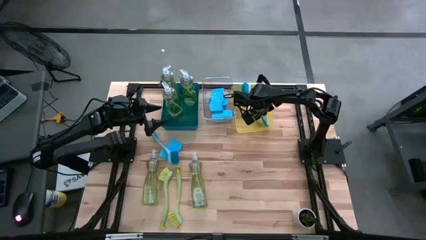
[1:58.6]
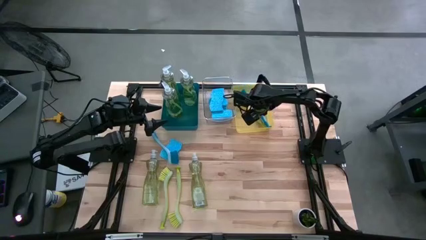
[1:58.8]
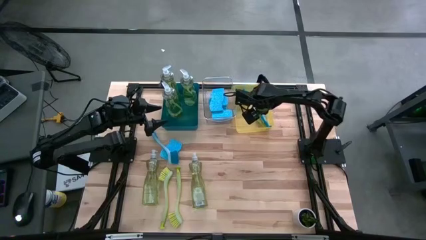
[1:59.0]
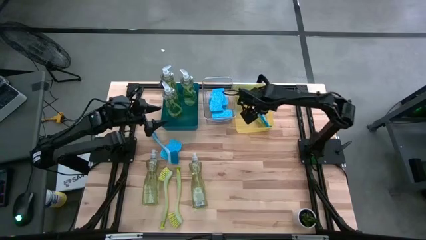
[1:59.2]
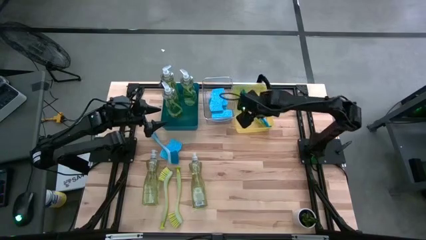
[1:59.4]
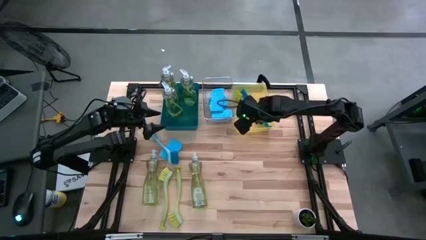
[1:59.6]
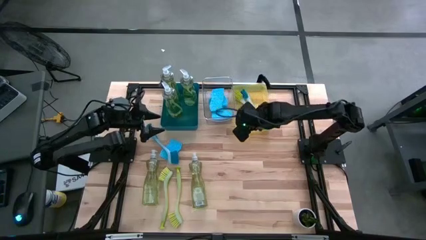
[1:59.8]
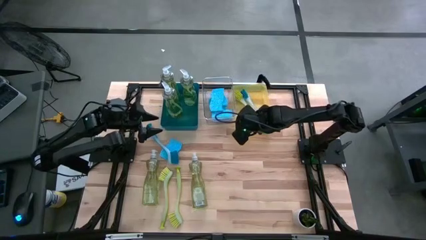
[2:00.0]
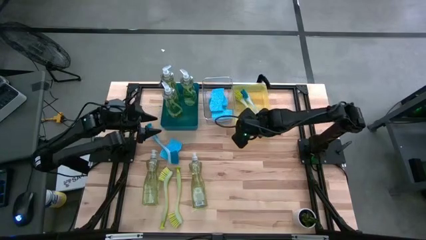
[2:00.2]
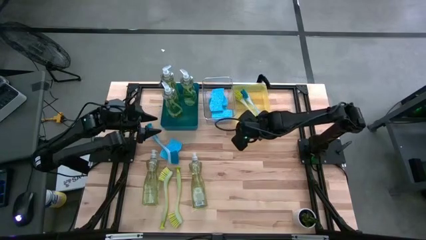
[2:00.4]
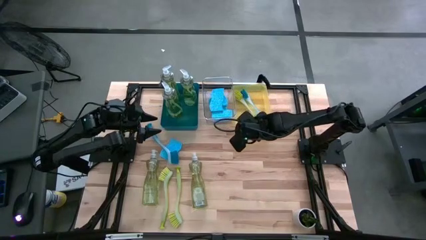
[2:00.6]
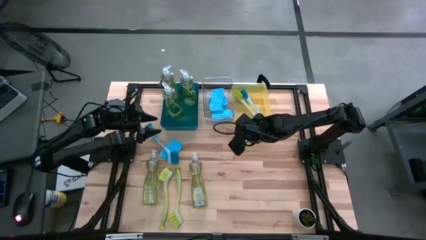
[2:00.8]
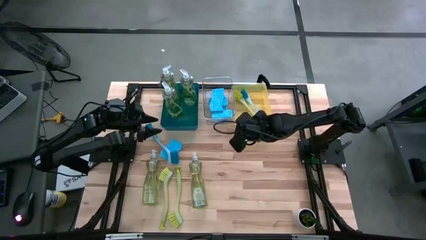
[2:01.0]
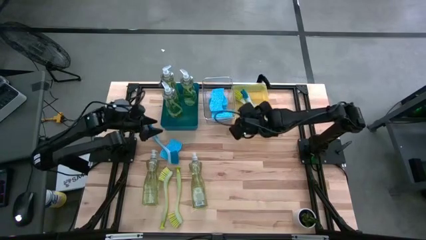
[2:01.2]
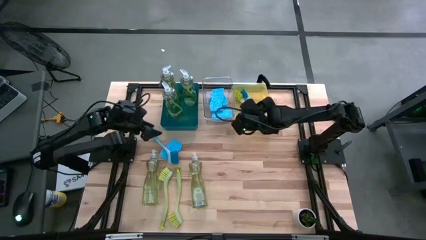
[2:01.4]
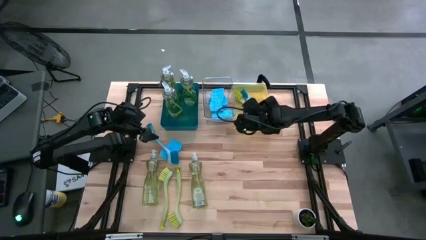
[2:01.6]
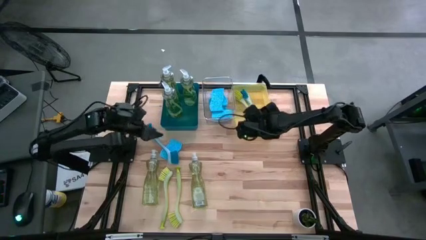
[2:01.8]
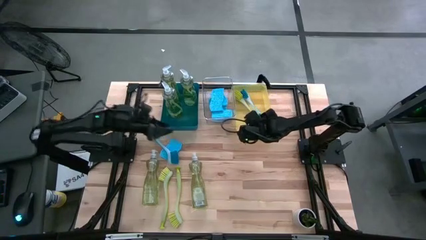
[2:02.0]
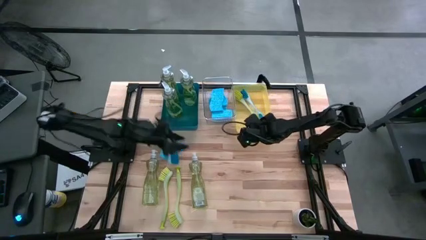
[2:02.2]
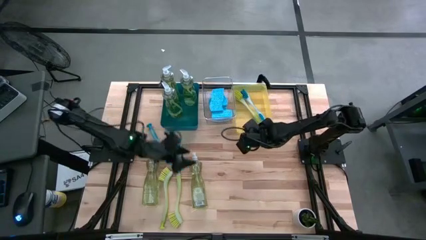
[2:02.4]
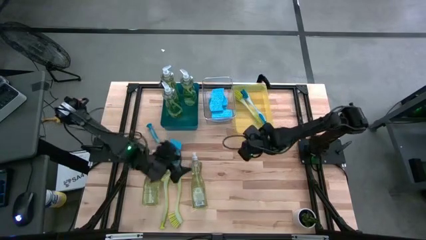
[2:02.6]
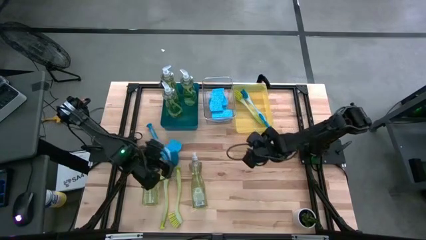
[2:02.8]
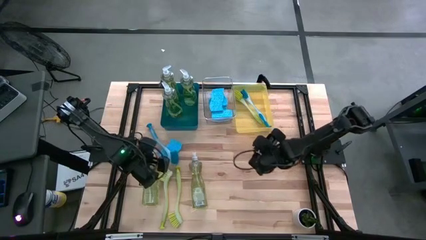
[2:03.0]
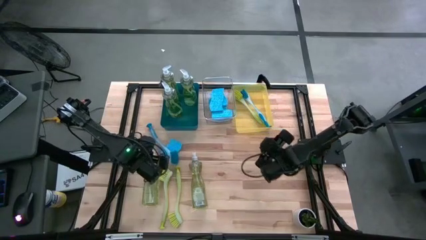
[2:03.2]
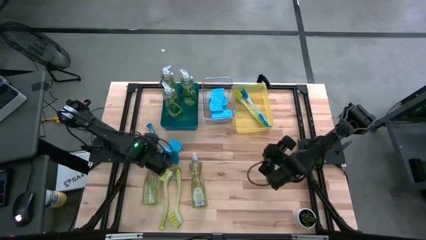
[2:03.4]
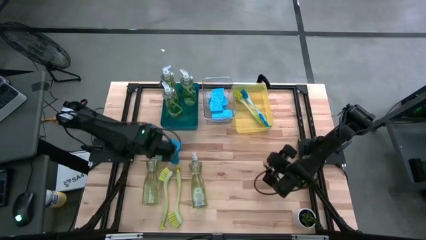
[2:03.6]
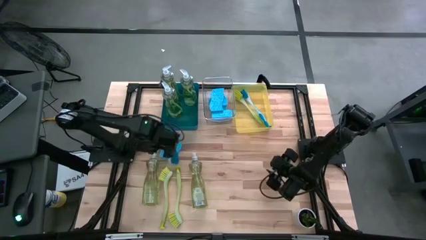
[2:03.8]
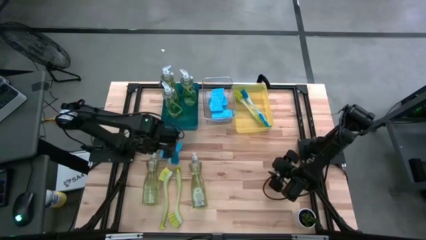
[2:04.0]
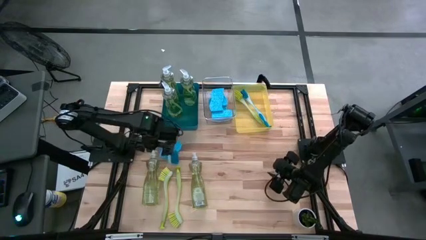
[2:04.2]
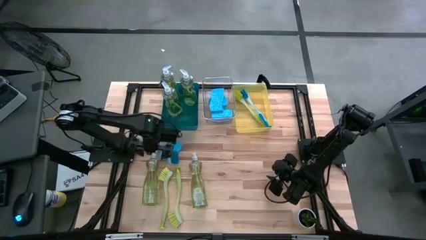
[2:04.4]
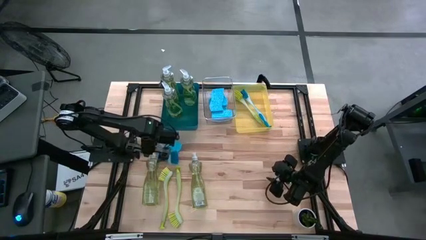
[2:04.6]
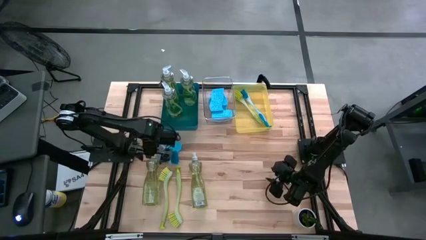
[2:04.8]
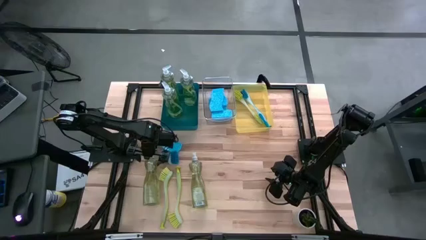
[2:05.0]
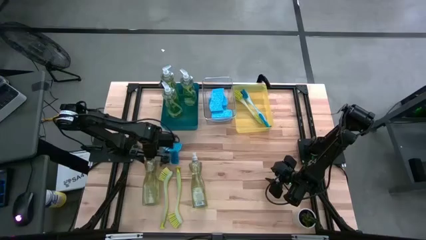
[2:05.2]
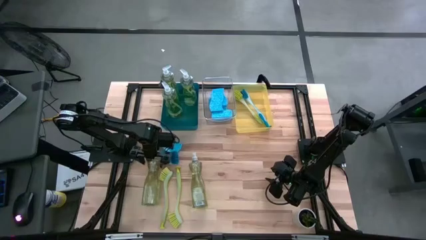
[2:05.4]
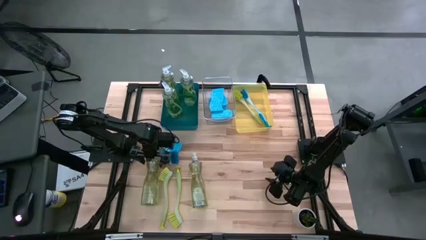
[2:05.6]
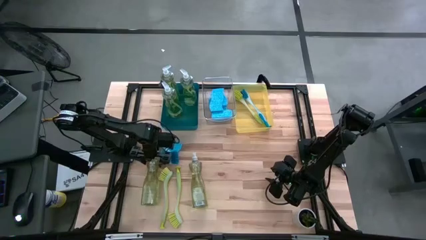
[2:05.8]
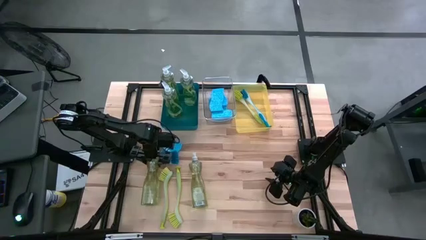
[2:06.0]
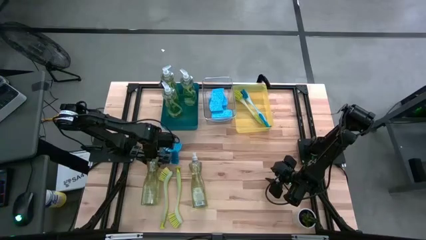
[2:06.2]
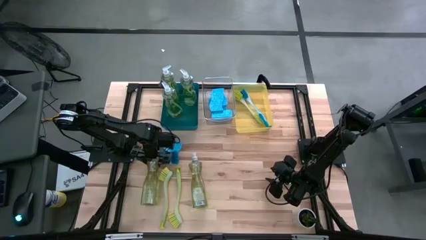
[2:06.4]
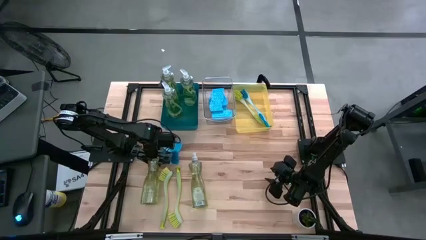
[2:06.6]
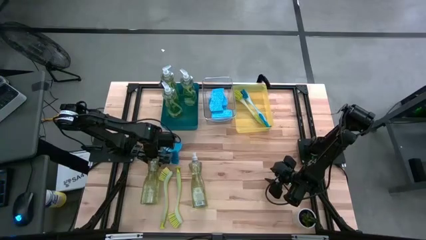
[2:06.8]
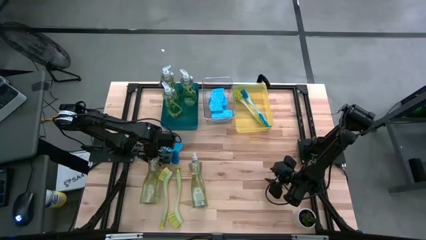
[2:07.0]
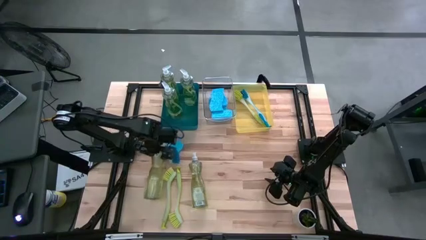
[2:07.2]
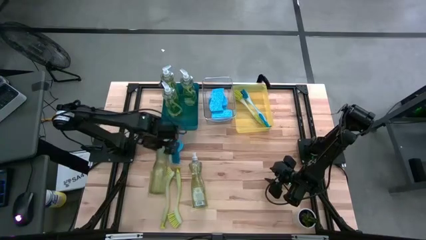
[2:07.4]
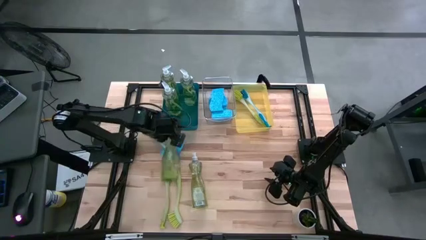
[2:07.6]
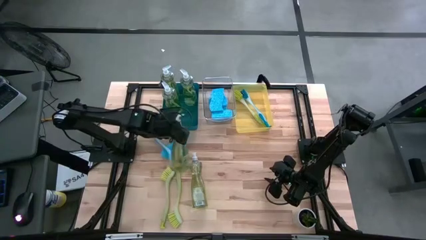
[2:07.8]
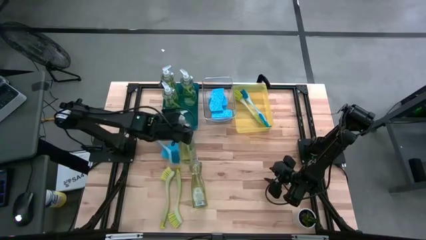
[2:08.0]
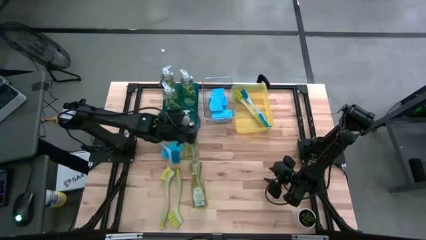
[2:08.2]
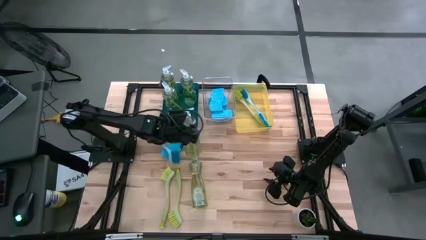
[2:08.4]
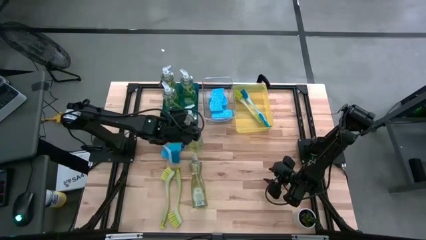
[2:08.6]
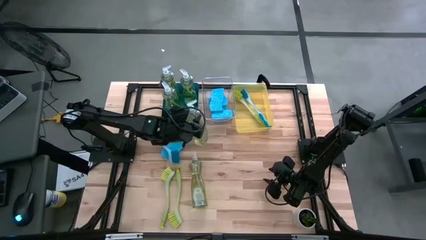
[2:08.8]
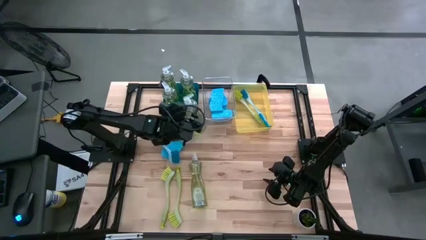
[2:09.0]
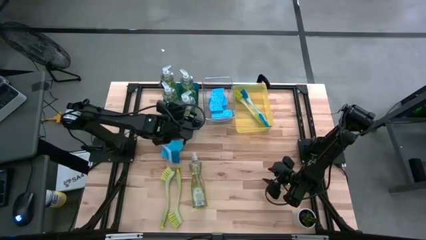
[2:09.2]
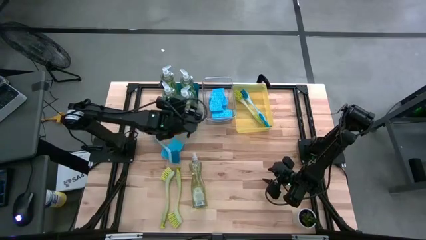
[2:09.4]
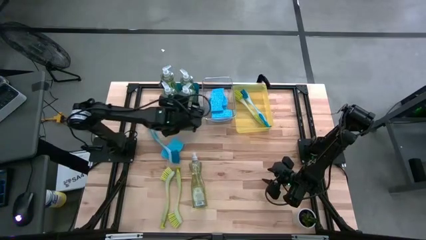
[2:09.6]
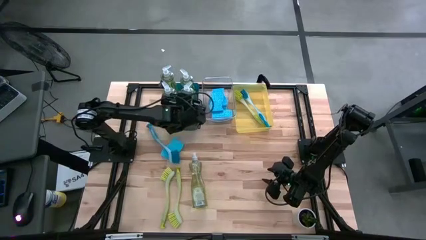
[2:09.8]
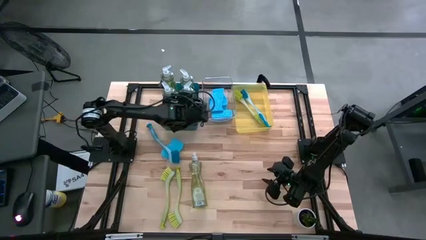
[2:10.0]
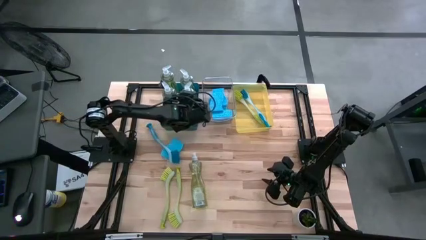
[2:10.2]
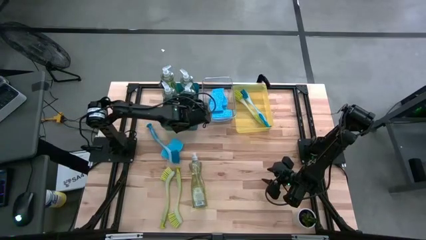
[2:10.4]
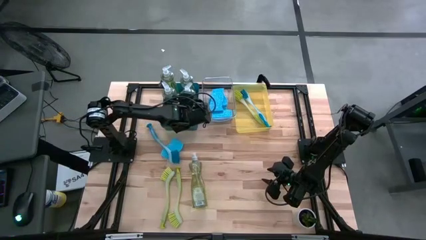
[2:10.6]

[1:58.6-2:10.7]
Task: Pick & Place Kitchen Sink Supplies
Put the dishwashing liquid into the blue bin

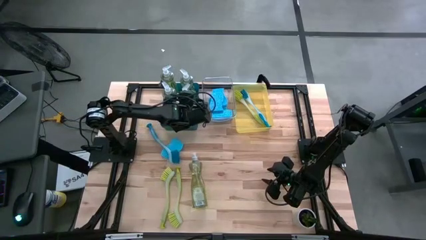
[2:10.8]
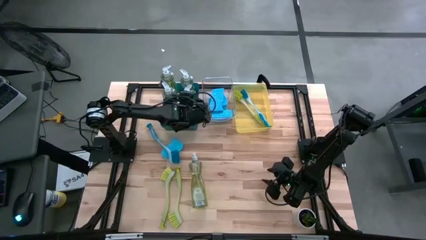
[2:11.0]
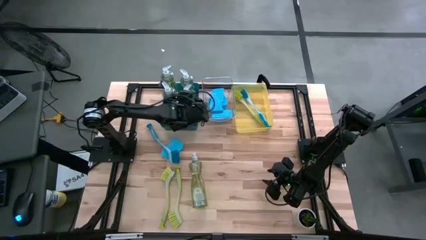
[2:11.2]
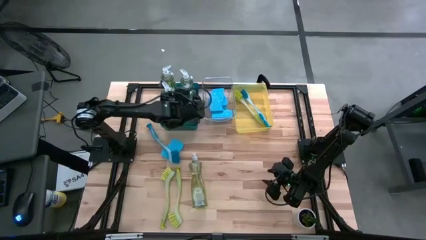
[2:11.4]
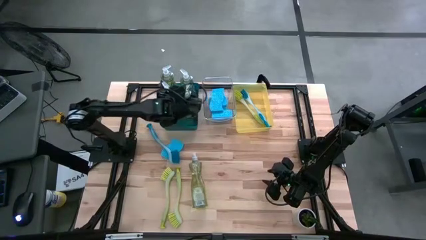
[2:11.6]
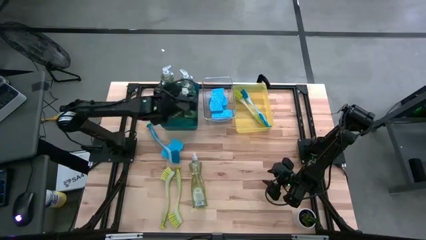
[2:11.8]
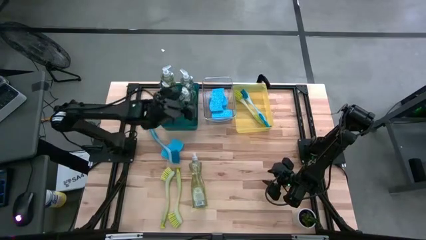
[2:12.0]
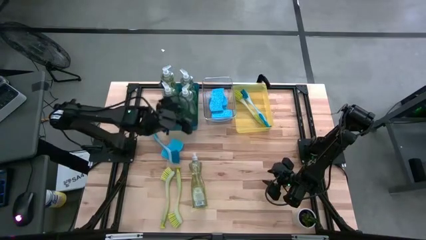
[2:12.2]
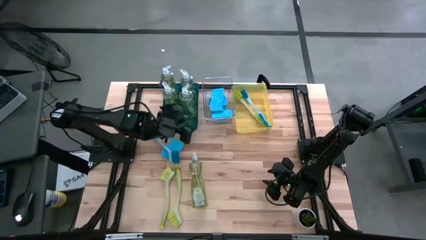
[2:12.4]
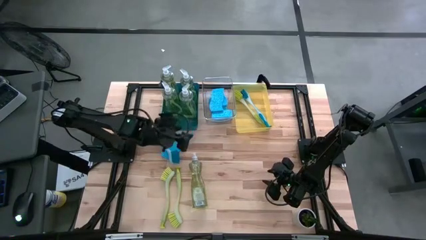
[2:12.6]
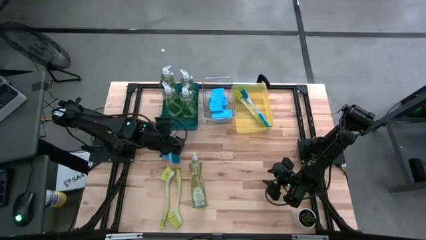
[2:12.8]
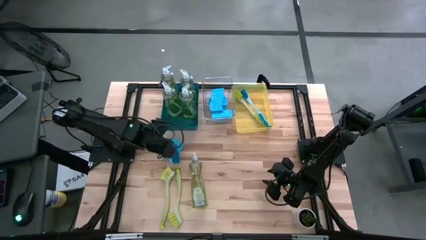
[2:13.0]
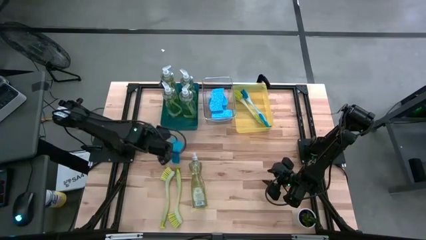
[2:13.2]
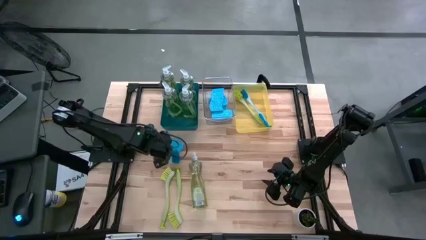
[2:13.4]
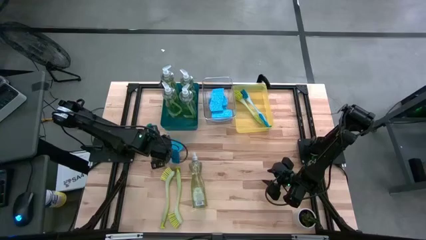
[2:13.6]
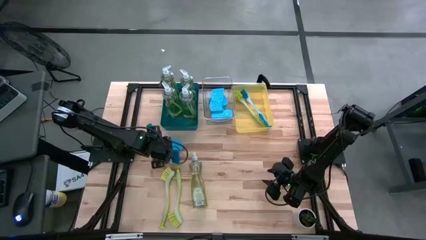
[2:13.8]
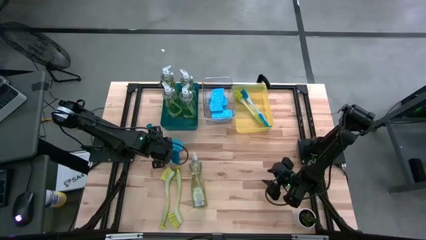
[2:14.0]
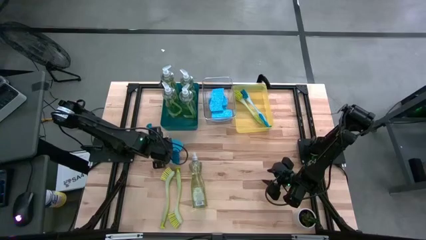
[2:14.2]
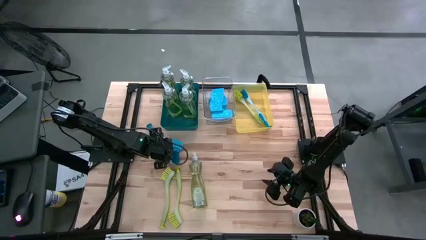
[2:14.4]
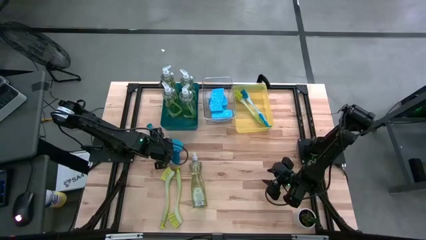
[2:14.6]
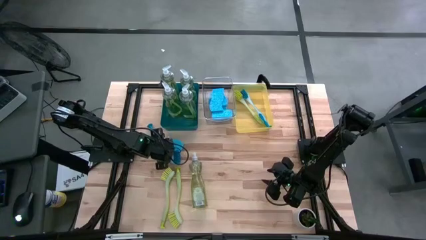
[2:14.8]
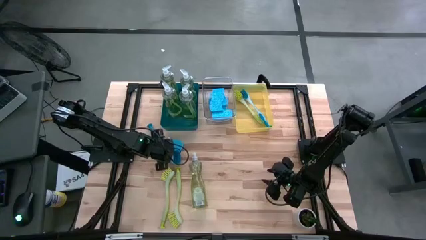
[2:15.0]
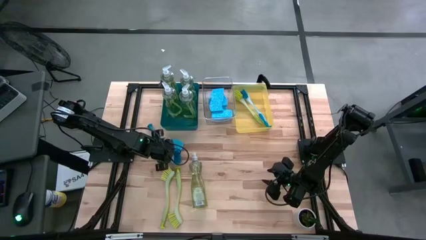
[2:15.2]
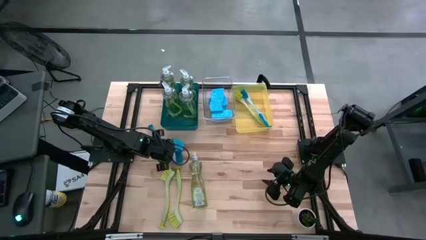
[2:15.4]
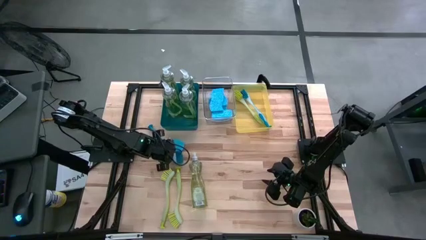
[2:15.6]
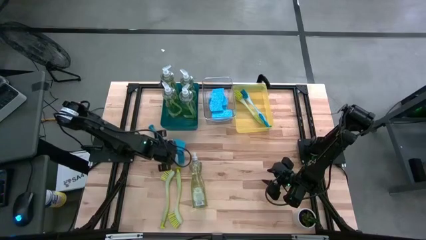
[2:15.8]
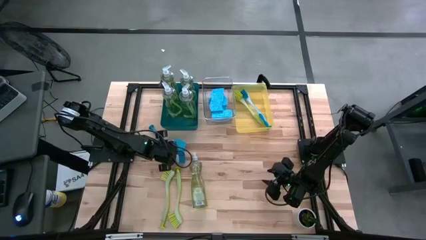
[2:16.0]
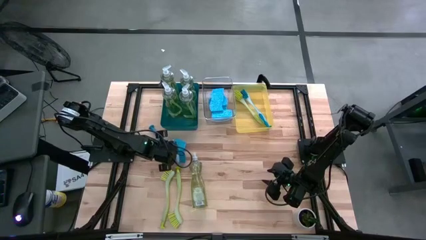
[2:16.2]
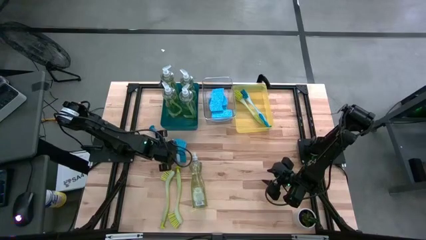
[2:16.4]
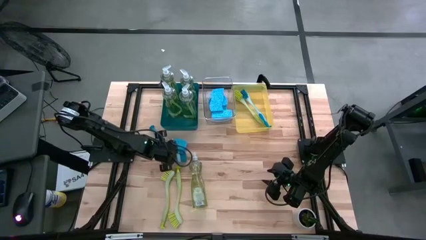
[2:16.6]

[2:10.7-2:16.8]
Put the blue dish brush into the yellow bin
